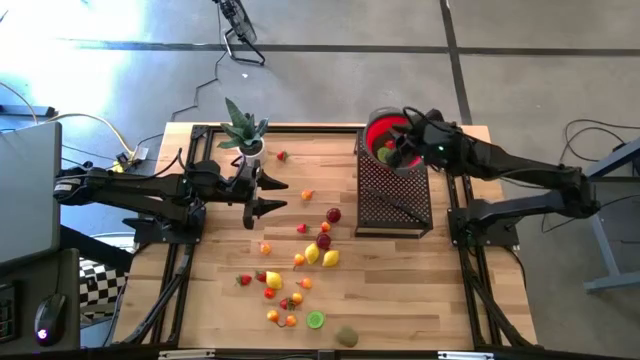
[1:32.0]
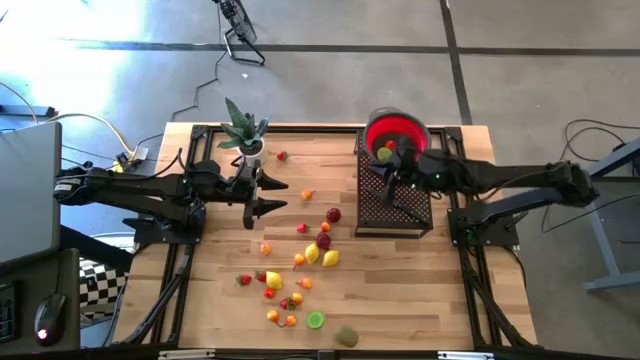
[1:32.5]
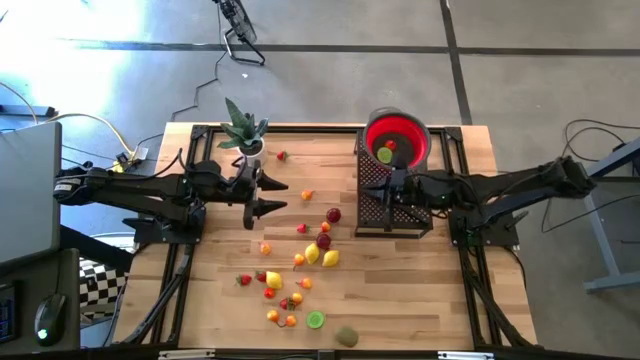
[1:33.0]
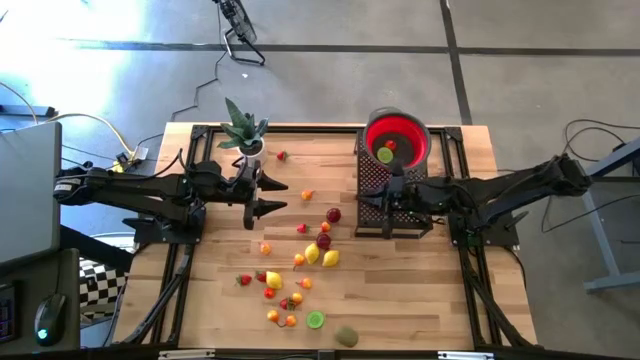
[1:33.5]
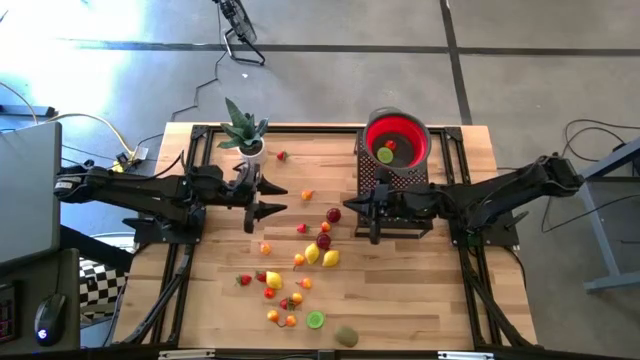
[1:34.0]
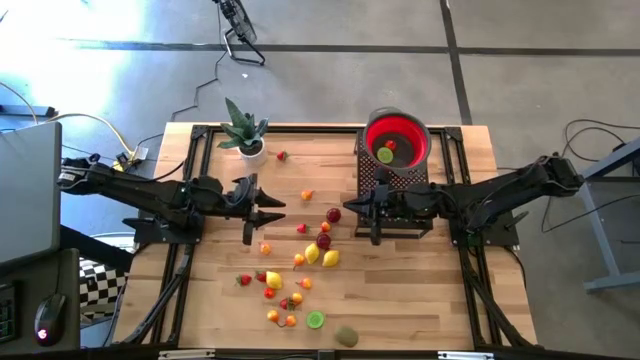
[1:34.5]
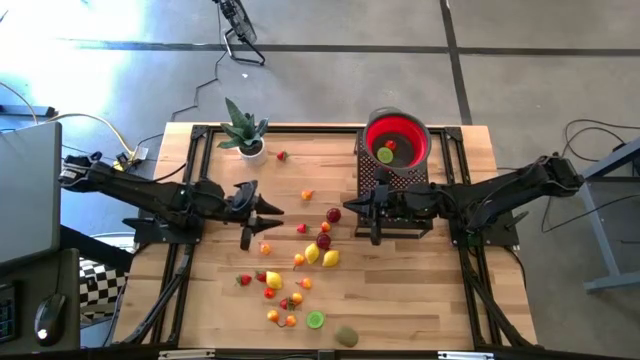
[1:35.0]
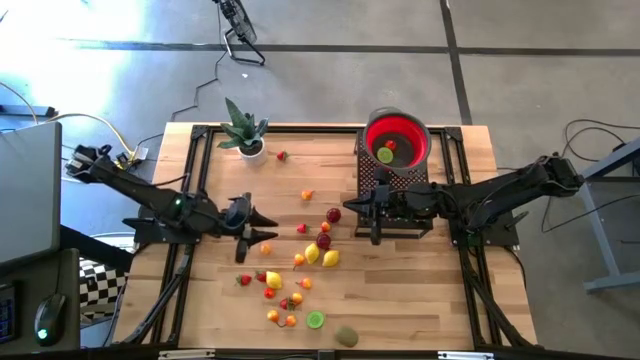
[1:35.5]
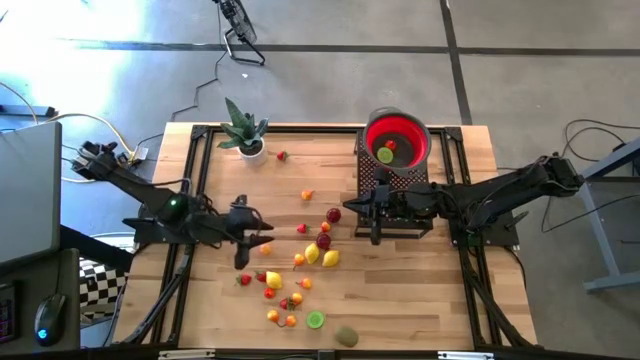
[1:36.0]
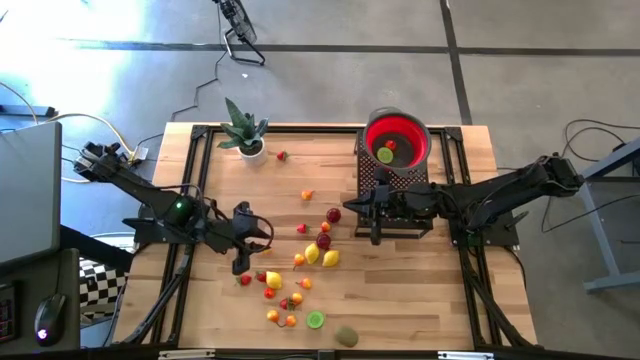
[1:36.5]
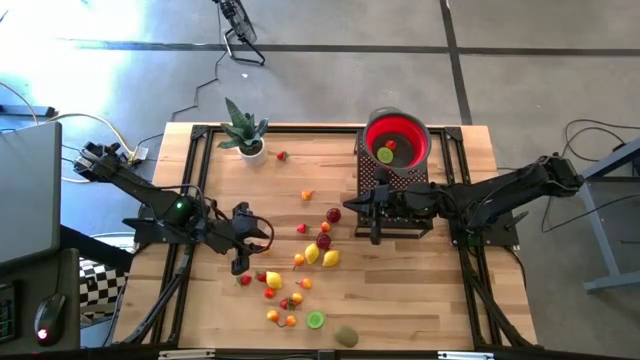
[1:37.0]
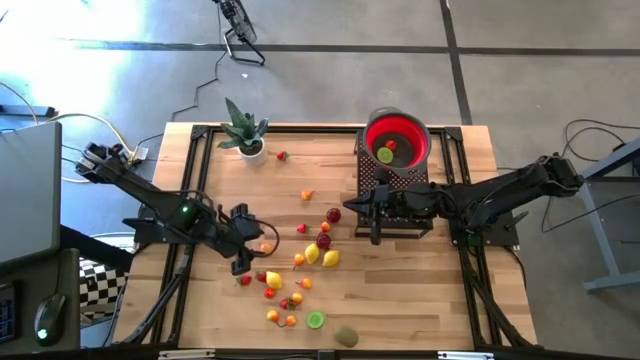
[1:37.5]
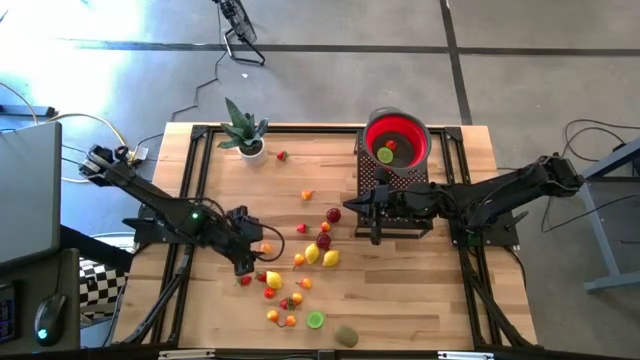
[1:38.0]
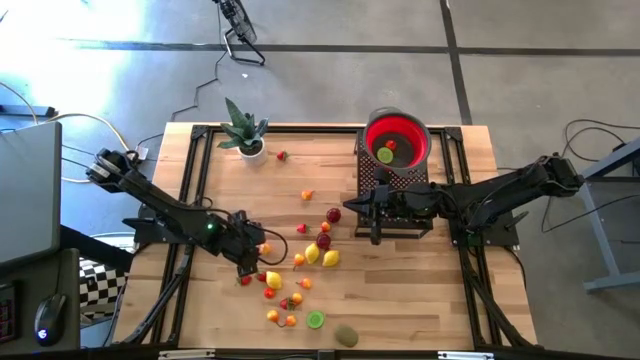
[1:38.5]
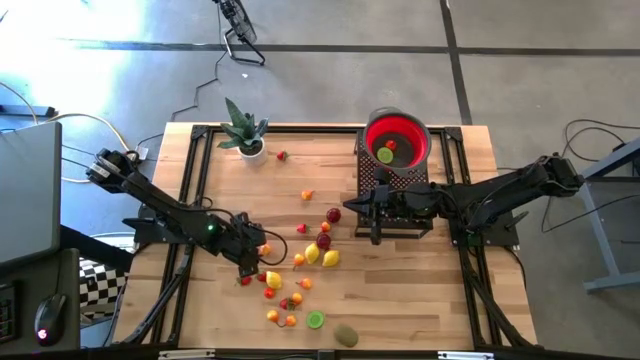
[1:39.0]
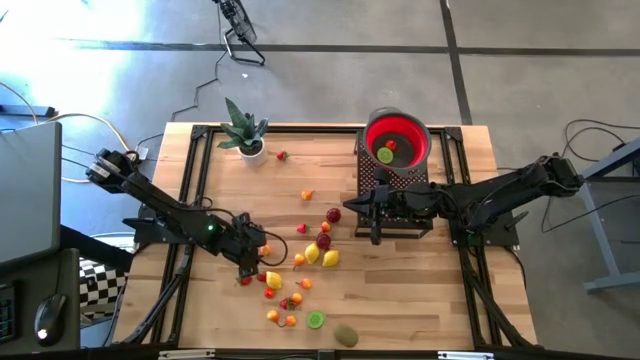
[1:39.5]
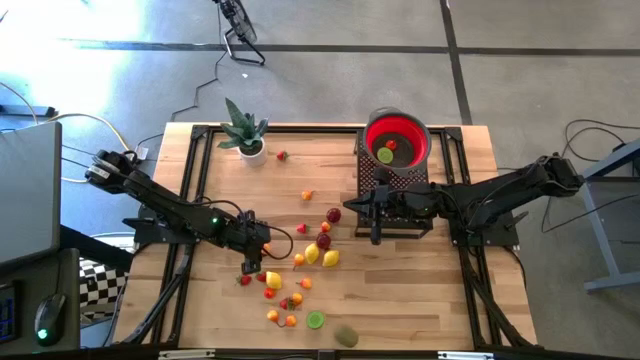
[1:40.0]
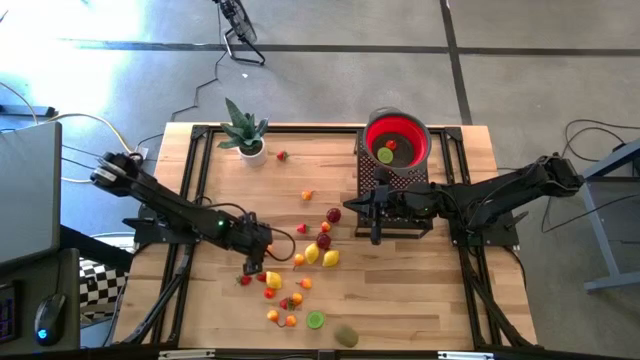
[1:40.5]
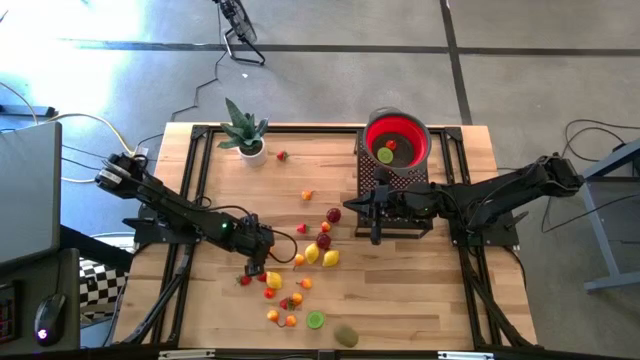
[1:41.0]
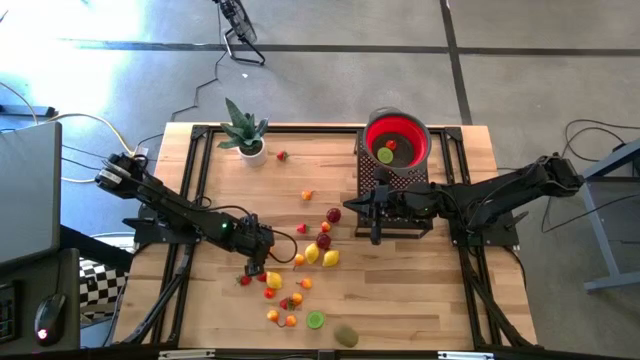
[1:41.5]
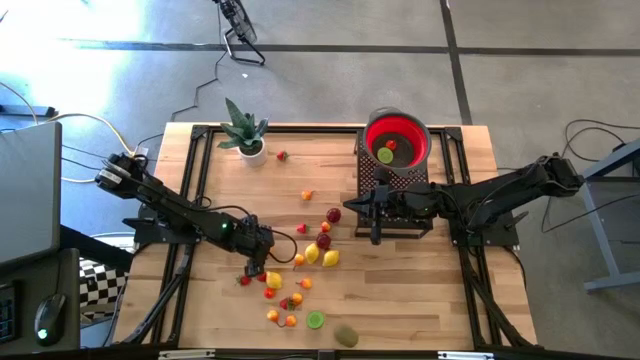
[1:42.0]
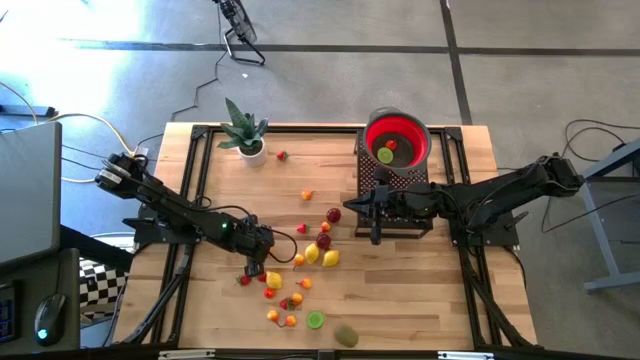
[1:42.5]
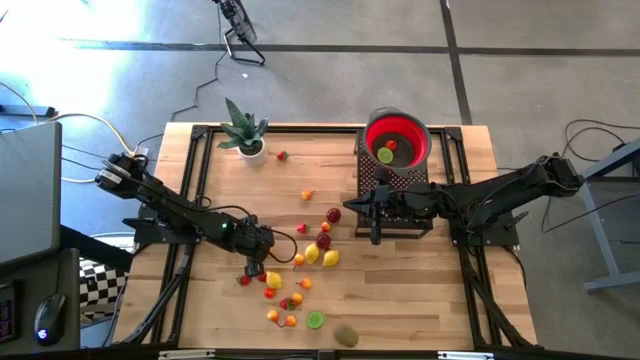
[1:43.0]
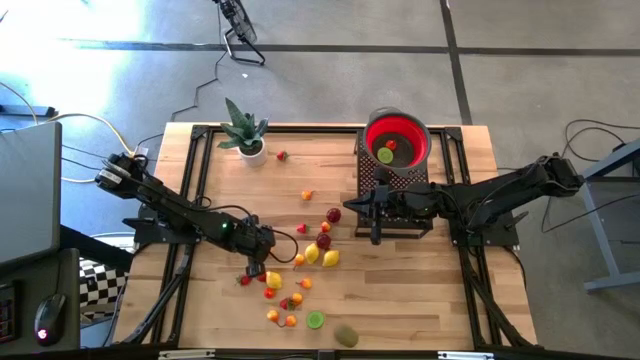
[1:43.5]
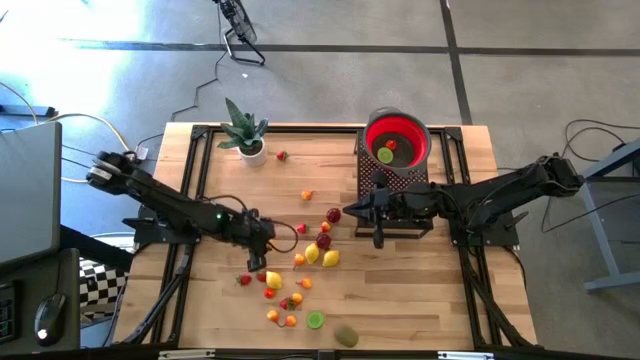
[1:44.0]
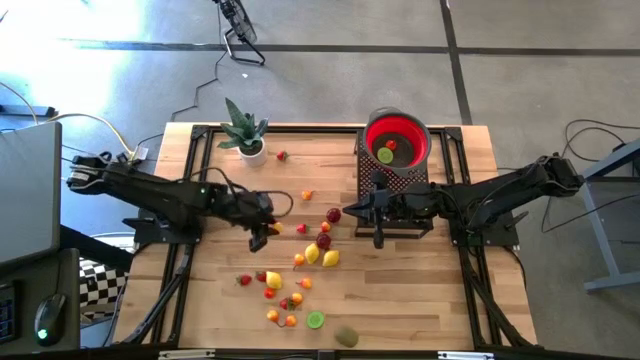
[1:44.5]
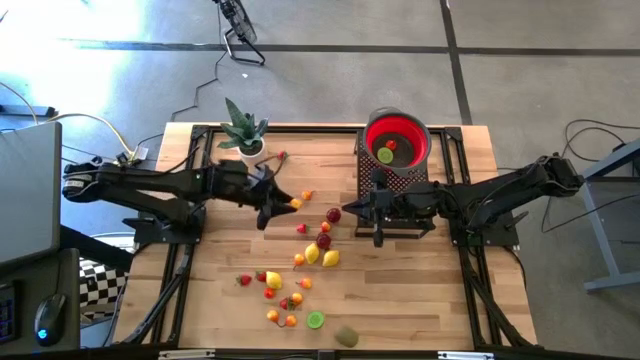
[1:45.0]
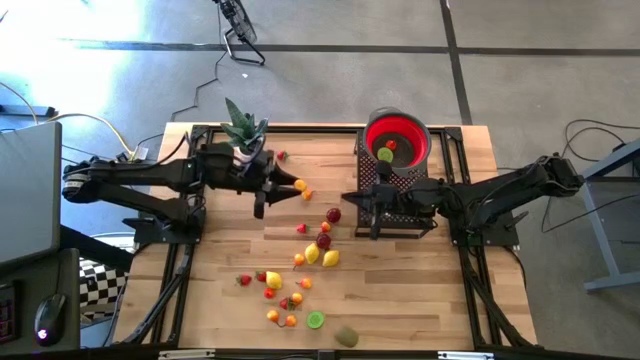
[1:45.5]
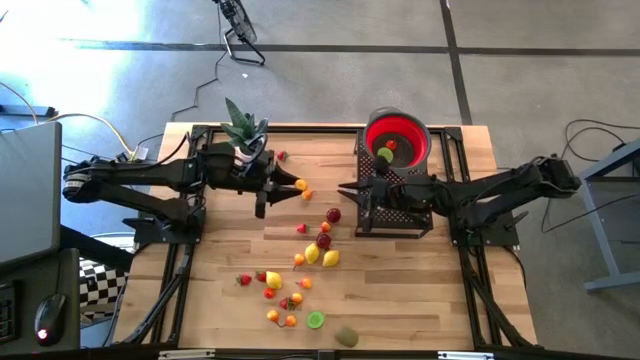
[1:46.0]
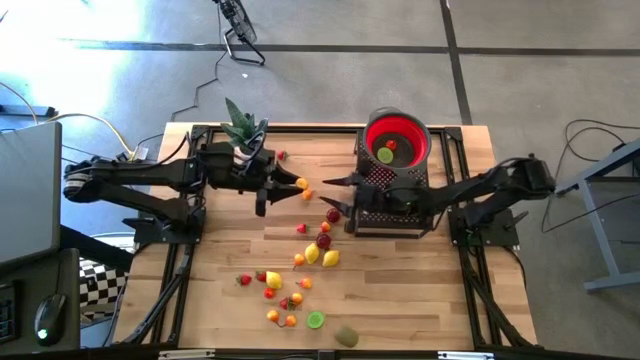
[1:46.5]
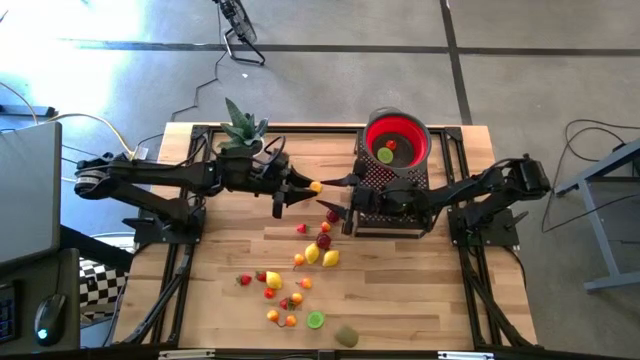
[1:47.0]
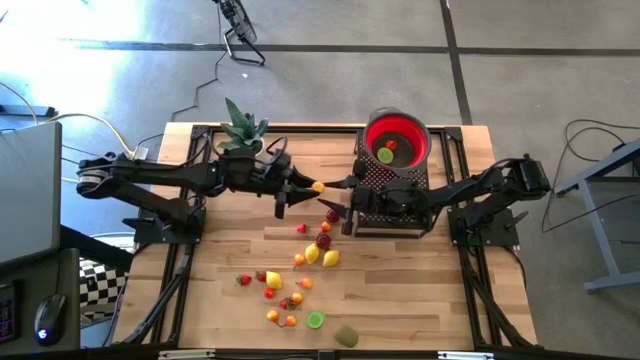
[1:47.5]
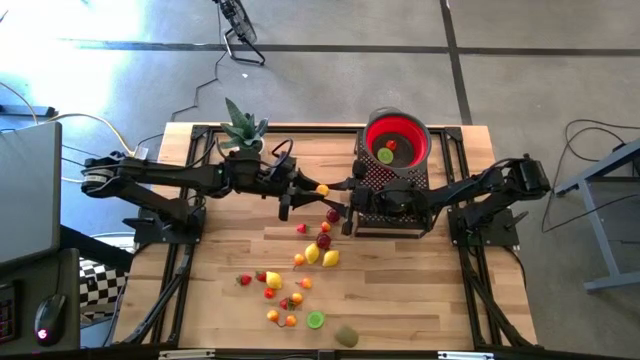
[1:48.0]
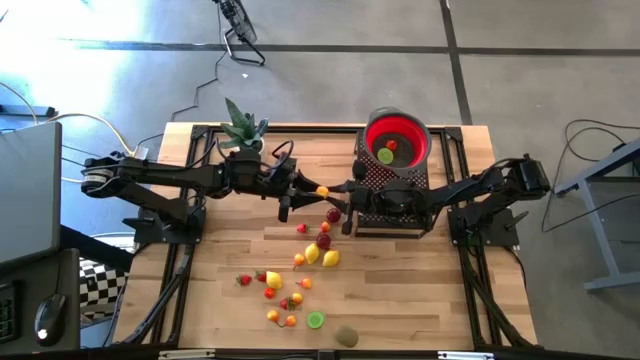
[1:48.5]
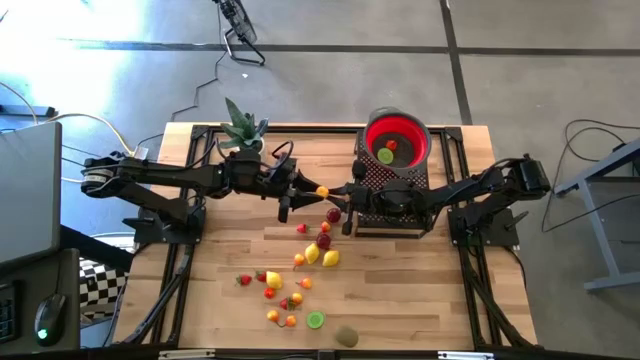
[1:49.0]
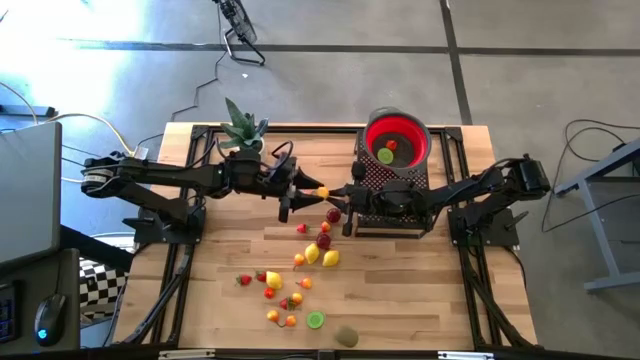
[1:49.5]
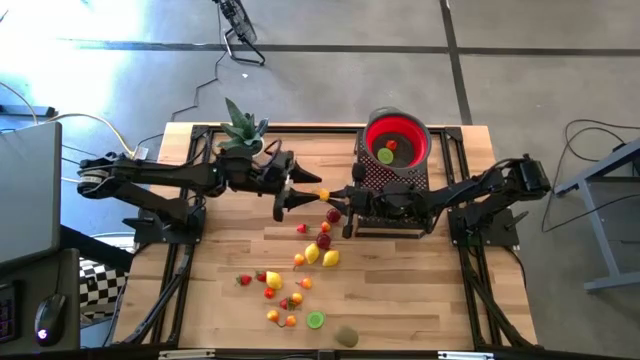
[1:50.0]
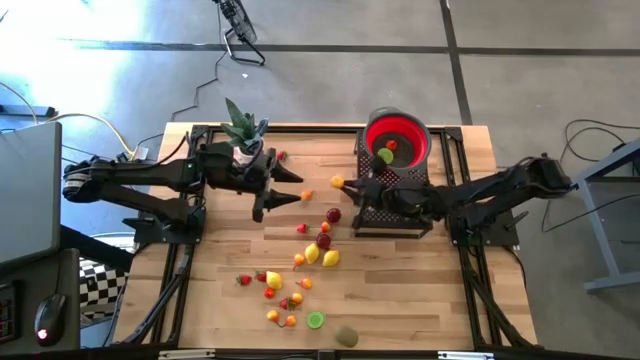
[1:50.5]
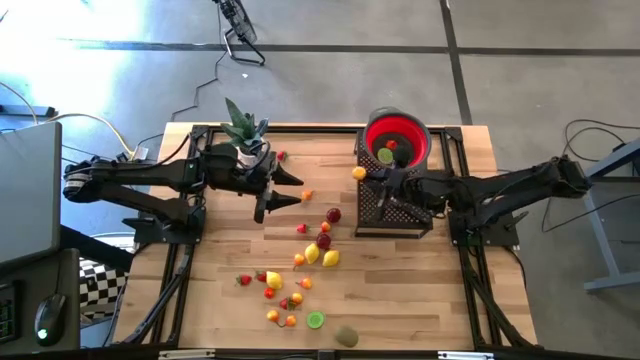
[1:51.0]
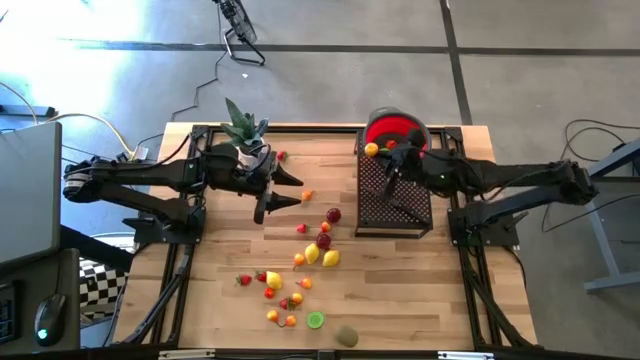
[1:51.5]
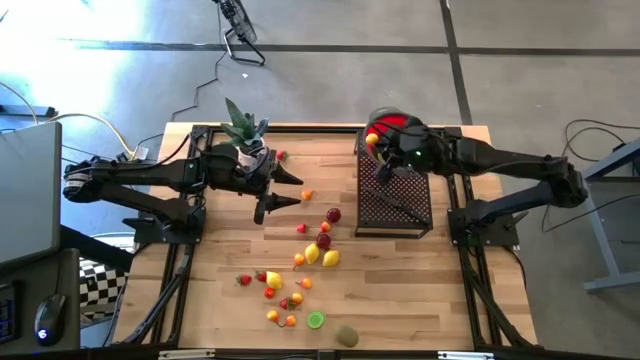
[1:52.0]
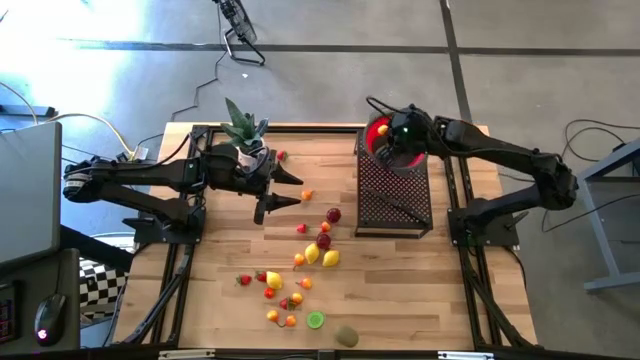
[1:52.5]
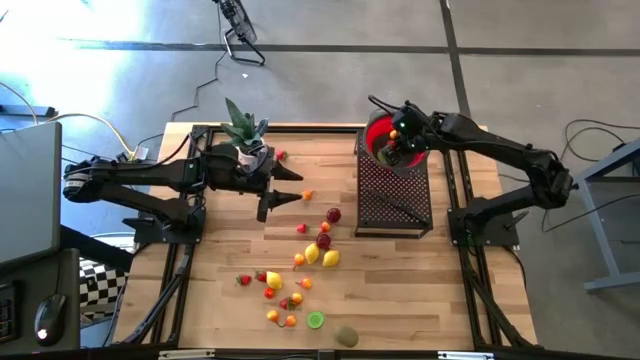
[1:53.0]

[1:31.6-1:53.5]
Task: Pick & Place Fruit
Put the pear into the strainer bowl on the shelf
